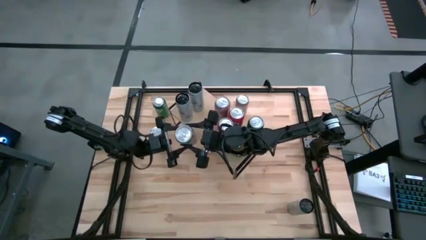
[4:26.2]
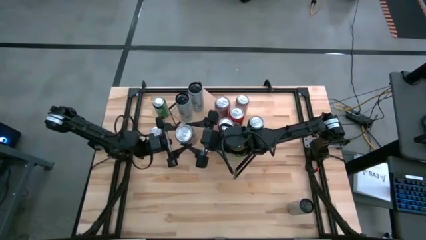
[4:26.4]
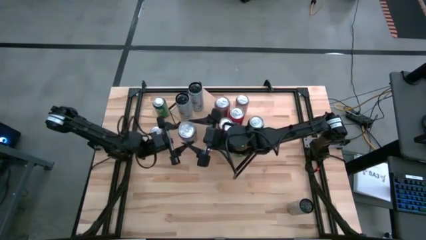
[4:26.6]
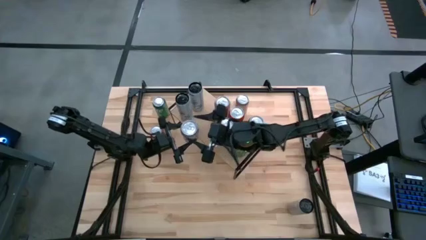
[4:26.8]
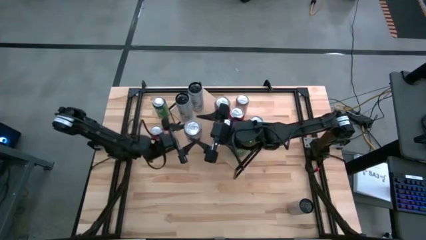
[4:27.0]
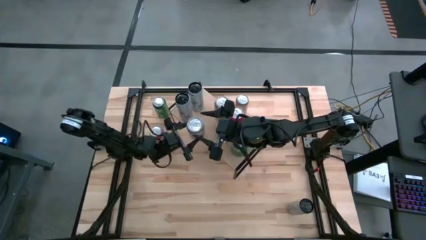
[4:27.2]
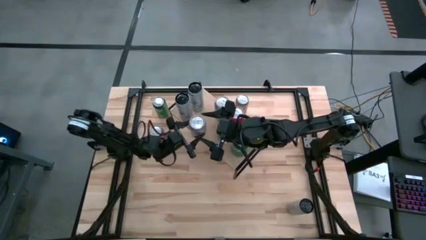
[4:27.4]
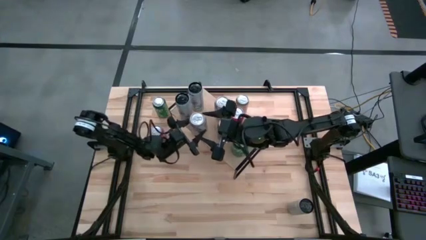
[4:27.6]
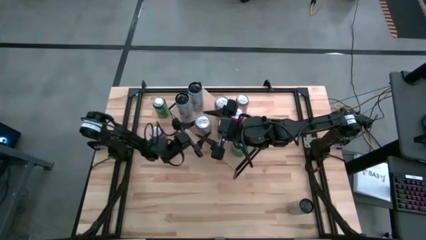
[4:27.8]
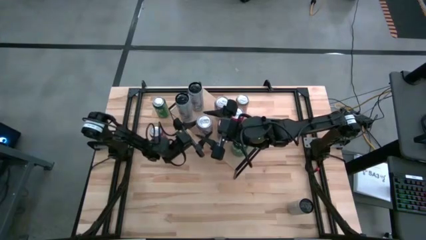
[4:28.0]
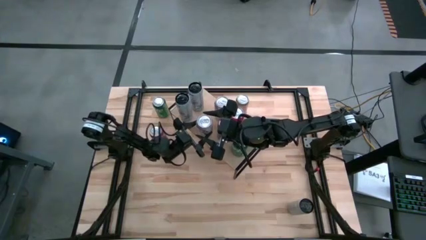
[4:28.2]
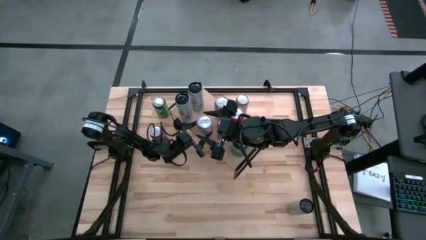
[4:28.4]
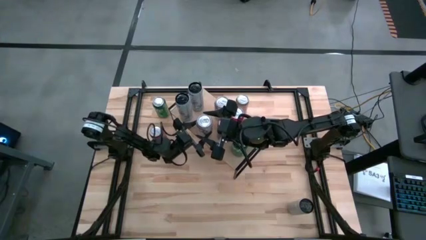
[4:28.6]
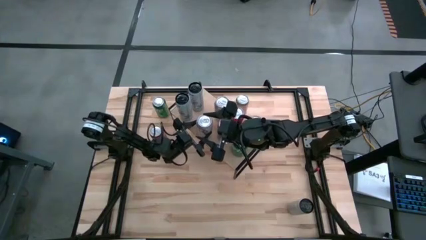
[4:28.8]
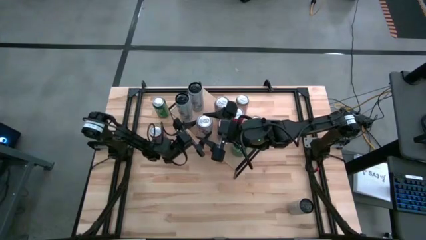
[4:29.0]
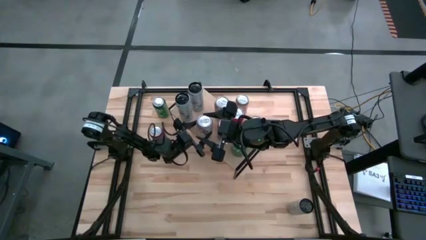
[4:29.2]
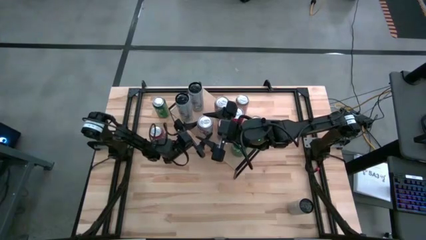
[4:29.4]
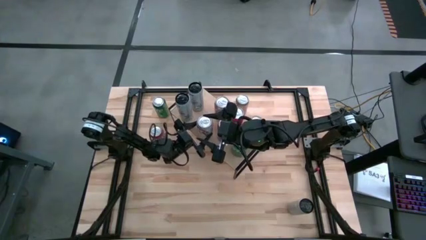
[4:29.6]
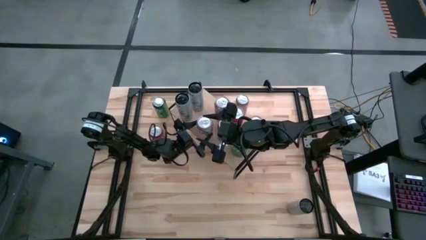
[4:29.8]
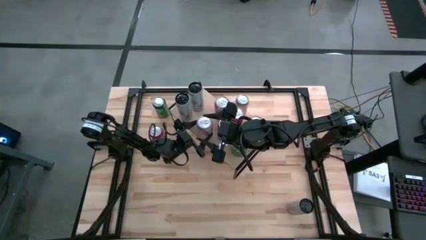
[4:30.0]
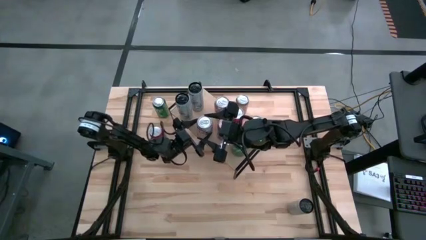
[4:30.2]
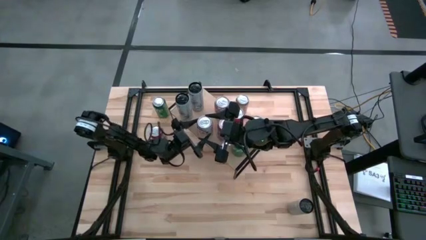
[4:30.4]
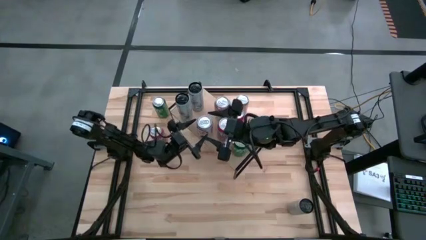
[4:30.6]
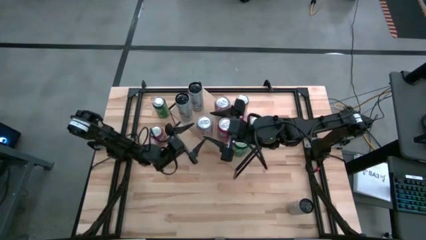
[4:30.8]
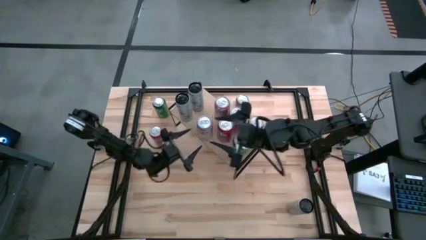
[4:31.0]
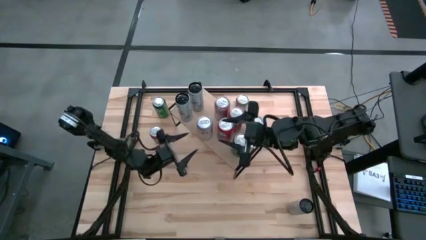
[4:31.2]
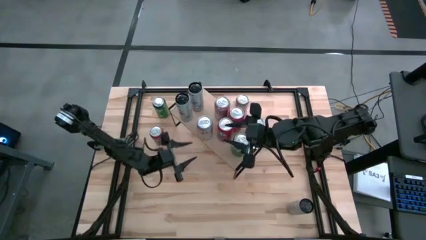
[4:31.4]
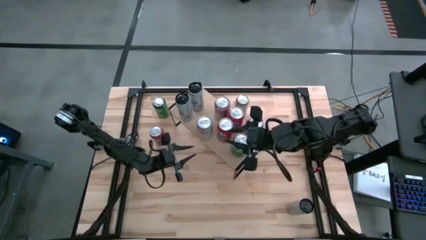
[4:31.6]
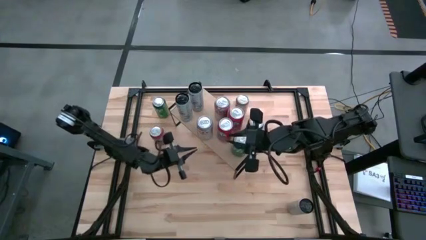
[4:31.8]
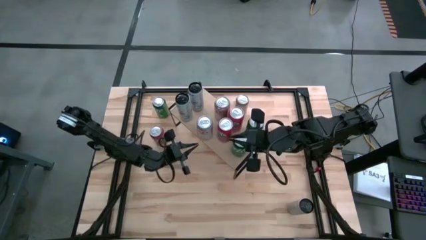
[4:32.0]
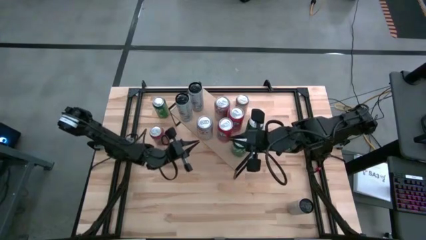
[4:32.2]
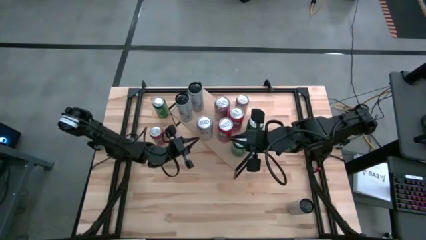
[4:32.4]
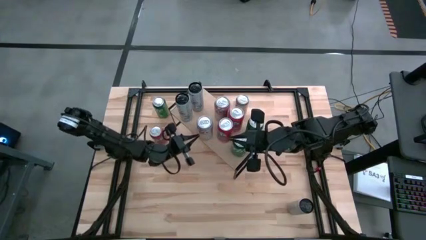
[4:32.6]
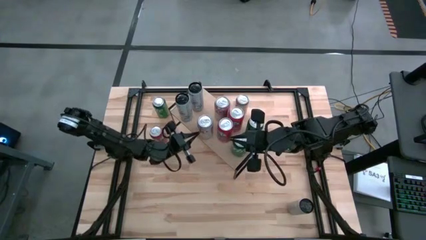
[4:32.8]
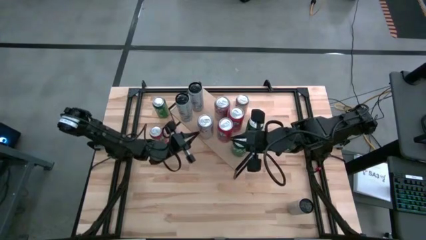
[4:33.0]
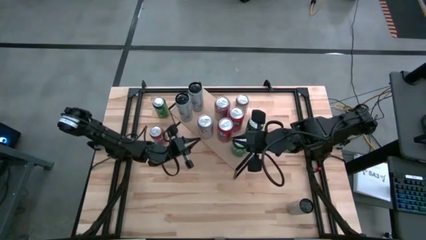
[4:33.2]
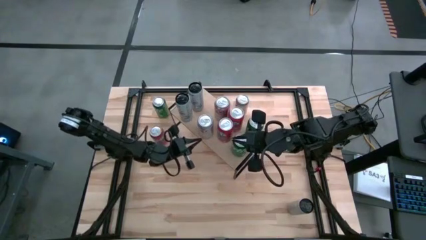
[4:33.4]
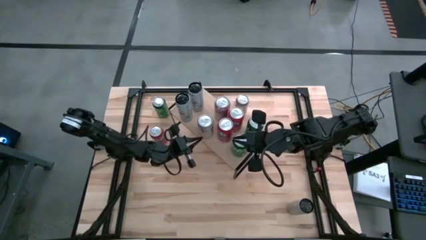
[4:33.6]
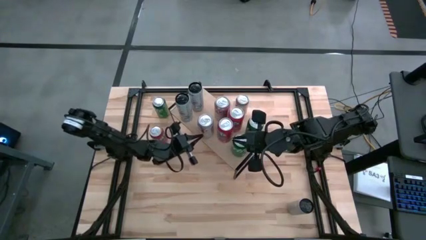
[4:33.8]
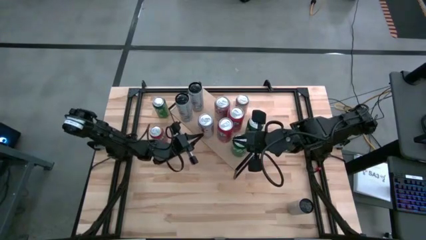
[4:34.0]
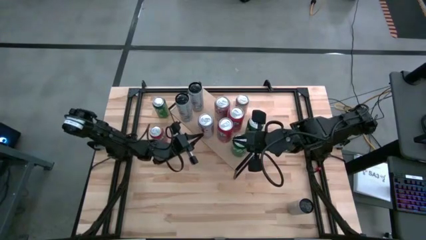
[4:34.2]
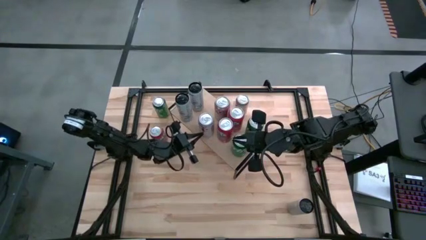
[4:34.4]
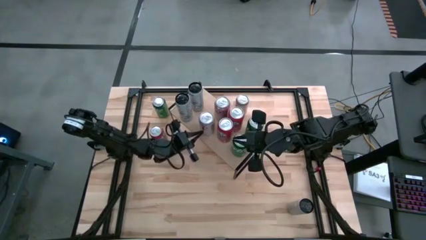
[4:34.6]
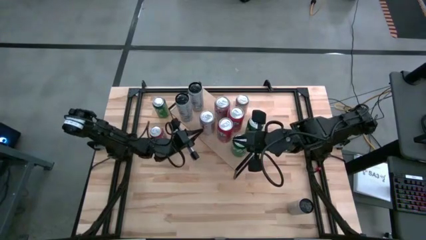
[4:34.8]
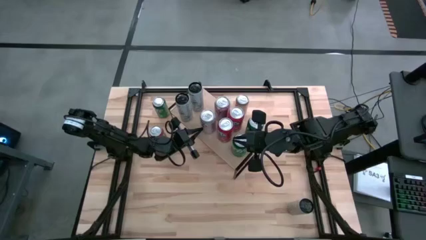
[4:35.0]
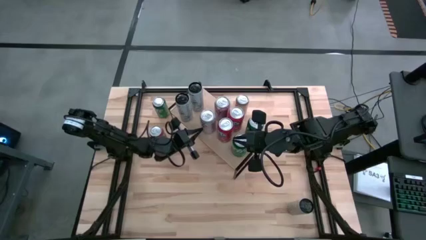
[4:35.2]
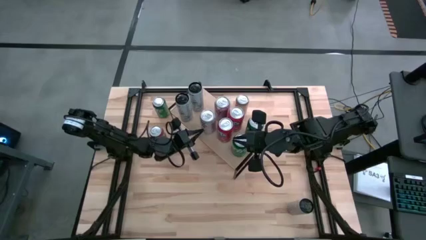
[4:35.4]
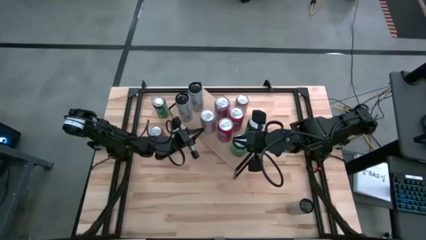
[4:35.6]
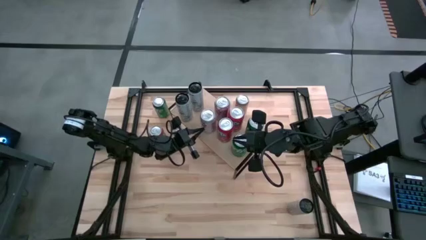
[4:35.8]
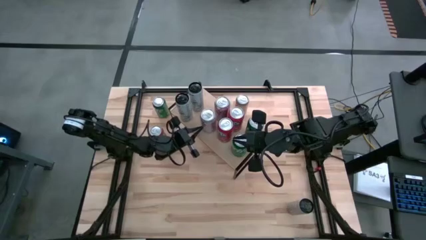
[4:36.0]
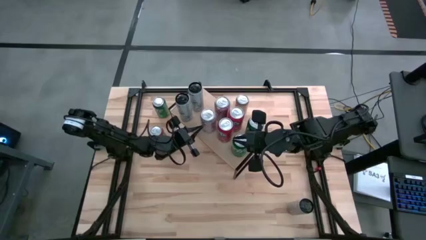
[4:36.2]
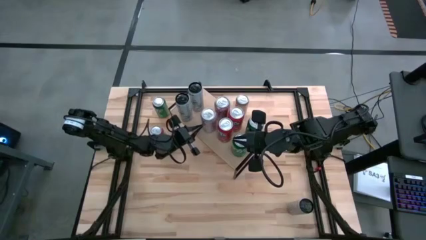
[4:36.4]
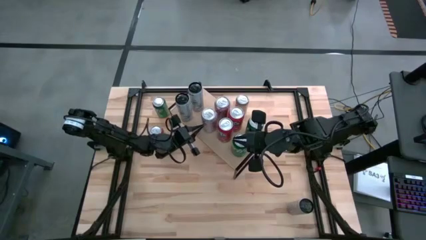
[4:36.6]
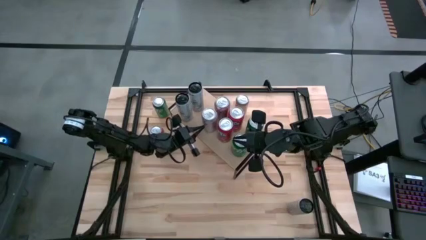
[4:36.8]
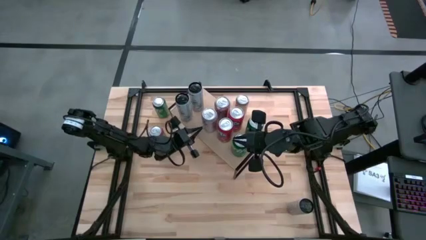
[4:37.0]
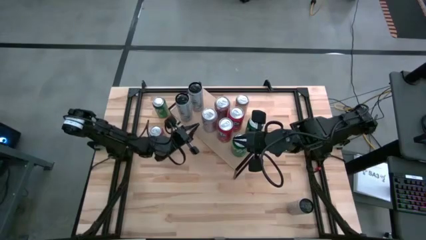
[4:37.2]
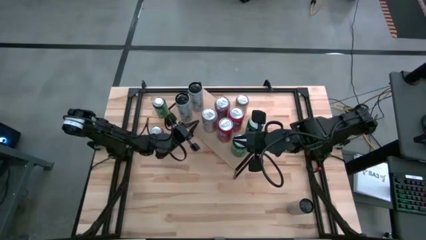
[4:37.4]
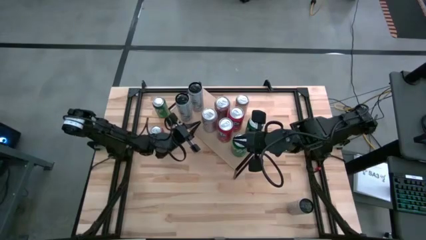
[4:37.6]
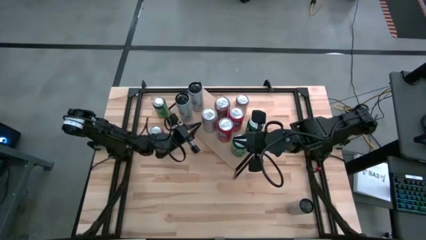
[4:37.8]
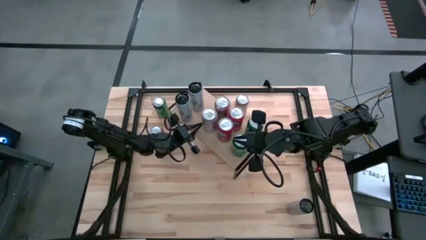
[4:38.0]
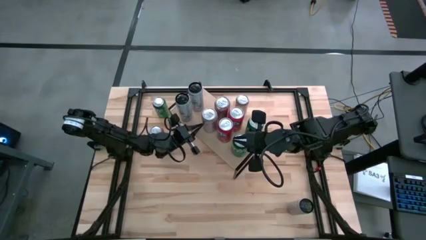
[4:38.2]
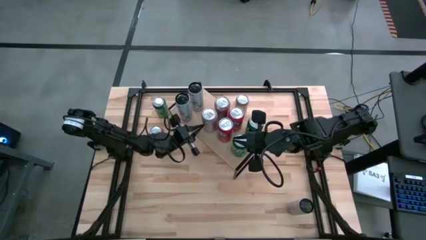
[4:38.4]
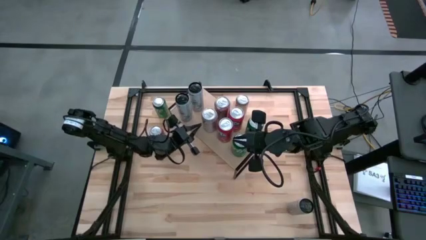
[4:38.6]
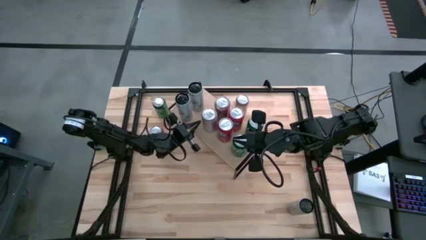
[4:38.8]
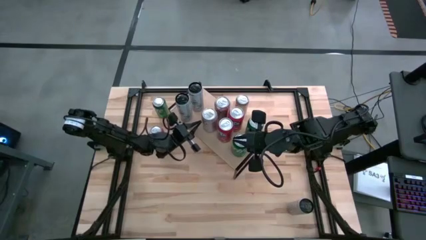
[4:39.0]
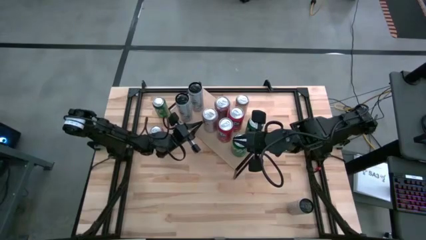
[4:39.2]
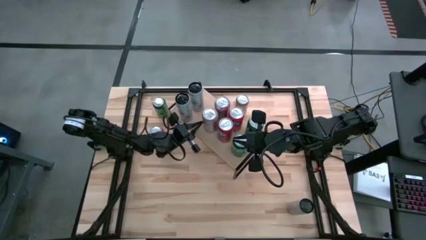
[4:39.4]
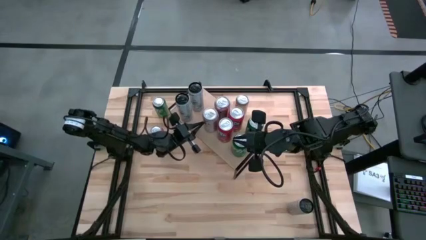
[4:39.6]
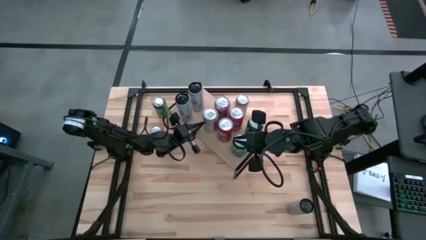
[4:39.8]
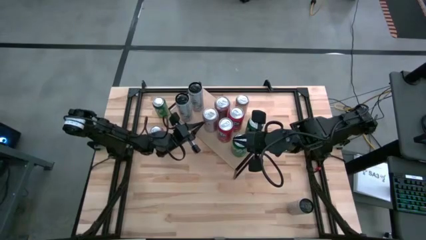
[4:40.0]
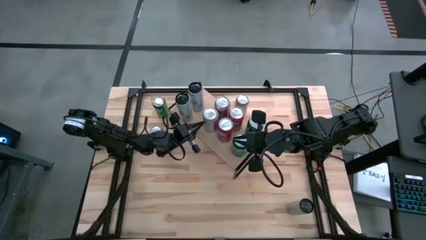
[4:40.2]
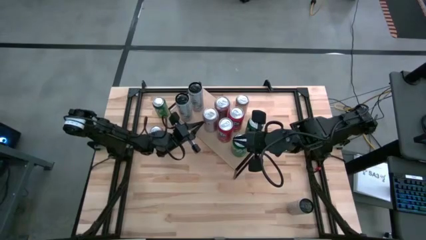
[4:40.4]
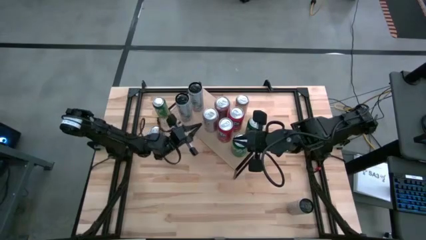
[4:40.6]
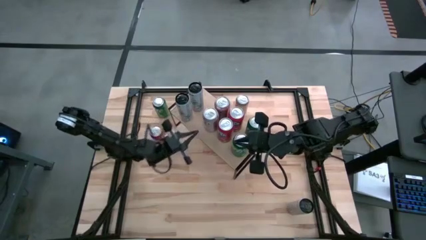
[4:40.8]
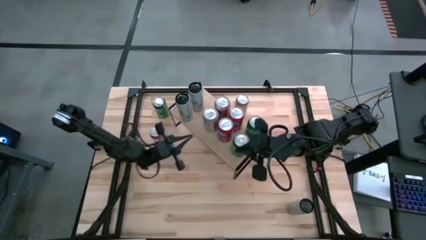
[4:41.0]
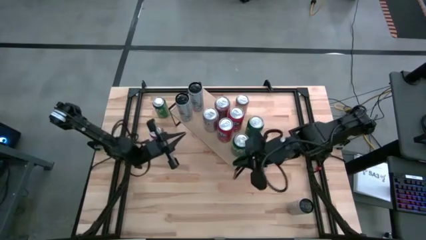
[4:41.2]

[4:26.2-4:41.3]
Task: Place canned beverage on shelf
Put the silver soda can on the shelf aligned with the other silver soda can

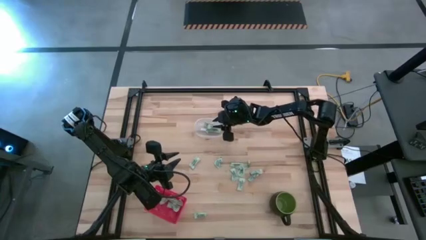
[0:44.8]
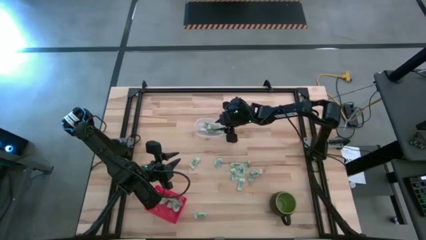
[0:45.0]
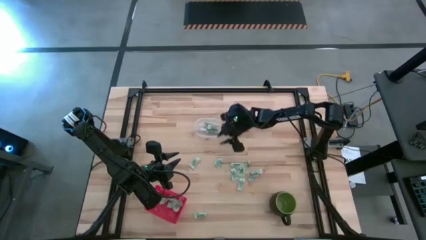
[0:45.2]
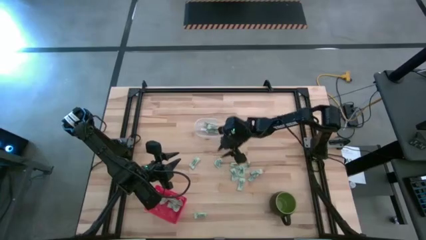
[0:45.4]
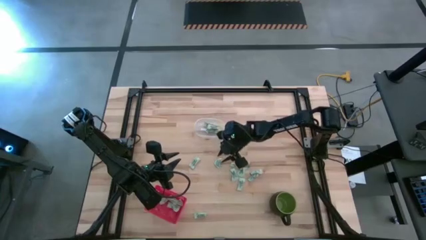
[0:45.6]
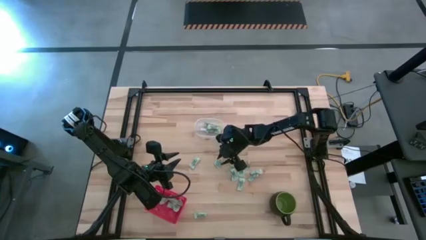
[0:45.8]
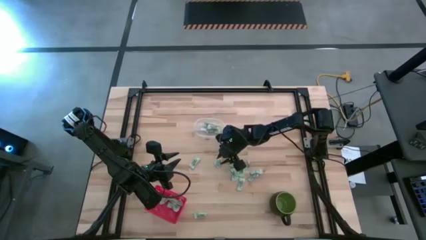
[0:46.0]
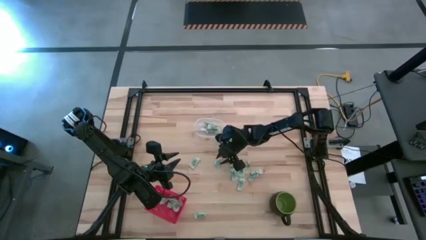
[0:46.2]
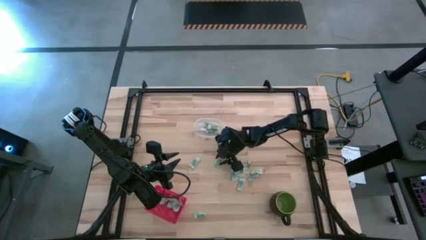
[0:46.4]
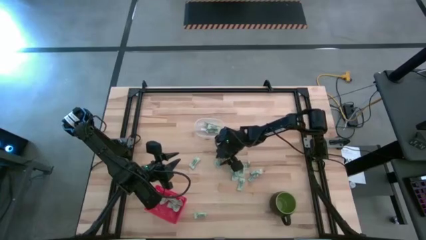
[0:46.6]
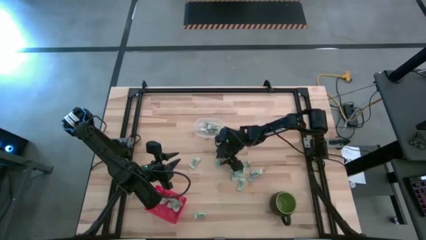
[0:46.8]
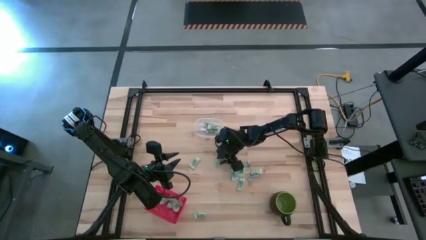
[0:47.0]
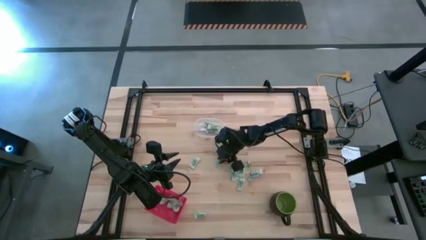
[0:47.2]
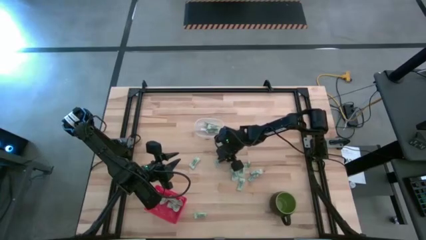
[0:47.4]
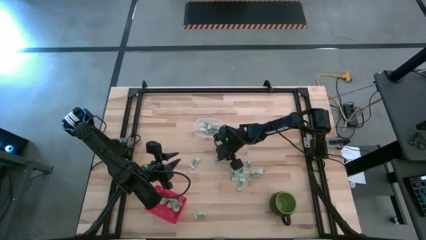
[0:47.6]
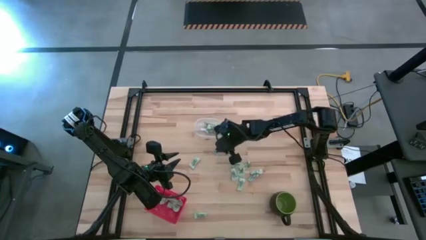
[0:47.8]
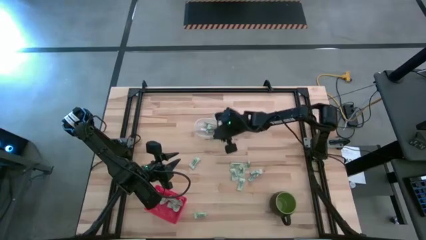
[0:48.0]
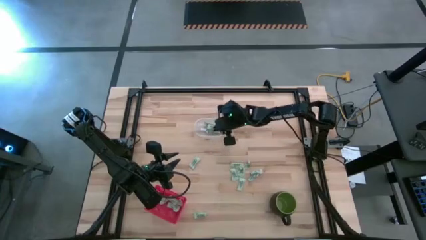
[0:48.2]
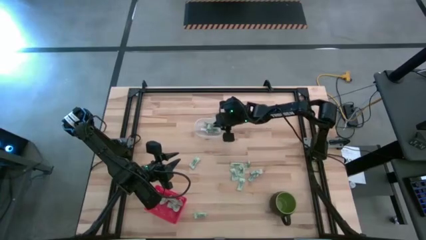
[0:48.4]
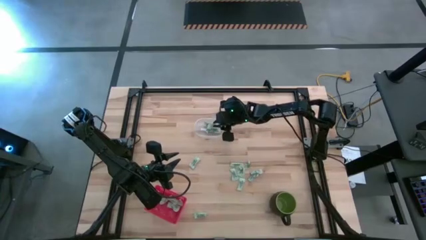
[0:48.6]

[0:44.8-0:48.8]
Task: Pick and place items into bin
Put the stevia packet into the transparent bin
